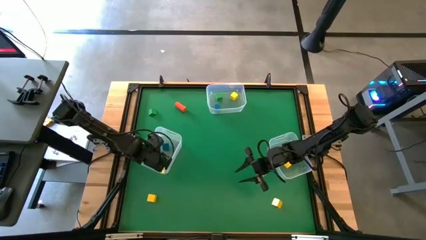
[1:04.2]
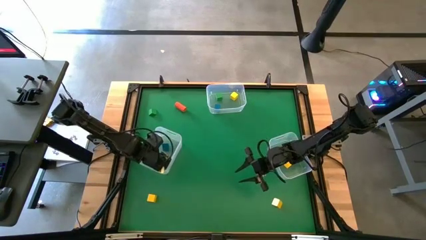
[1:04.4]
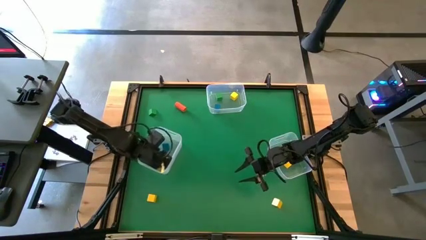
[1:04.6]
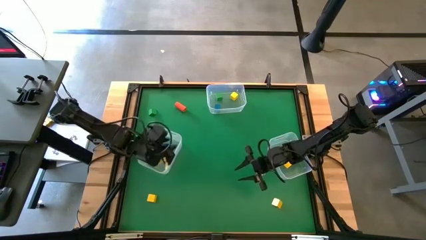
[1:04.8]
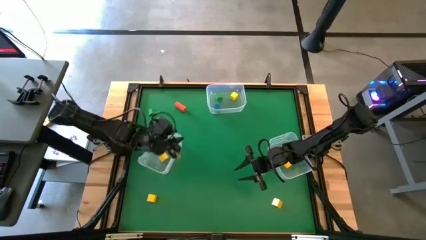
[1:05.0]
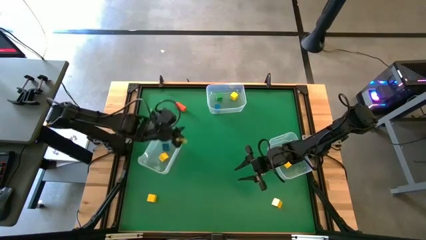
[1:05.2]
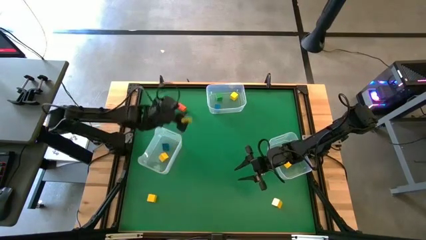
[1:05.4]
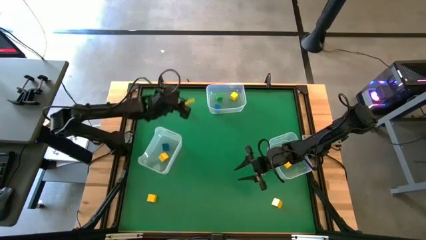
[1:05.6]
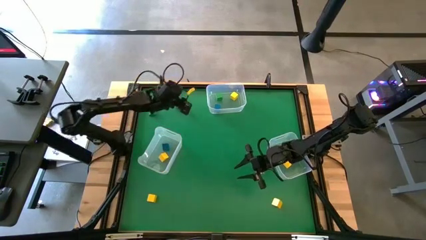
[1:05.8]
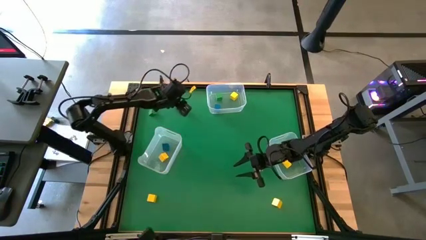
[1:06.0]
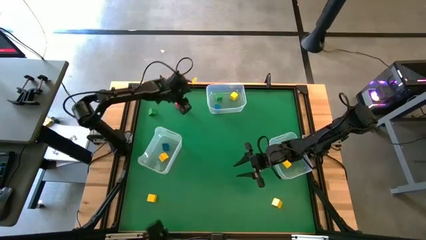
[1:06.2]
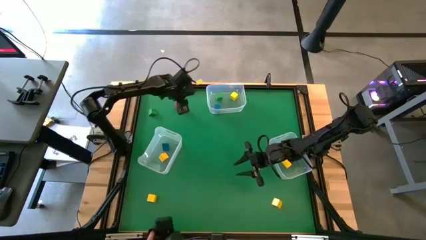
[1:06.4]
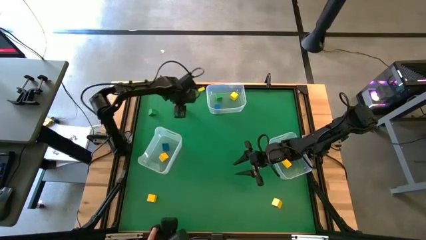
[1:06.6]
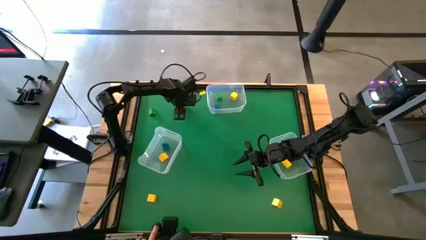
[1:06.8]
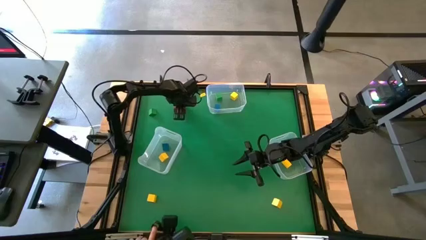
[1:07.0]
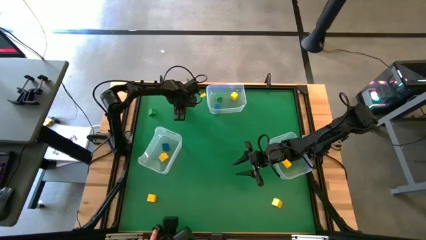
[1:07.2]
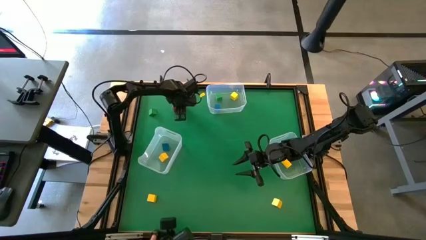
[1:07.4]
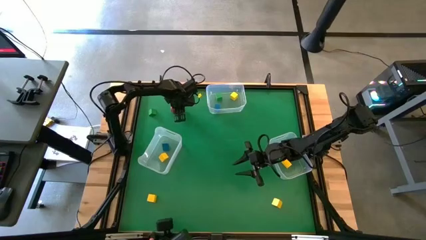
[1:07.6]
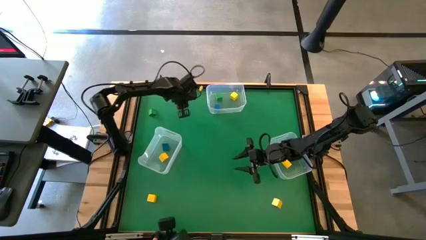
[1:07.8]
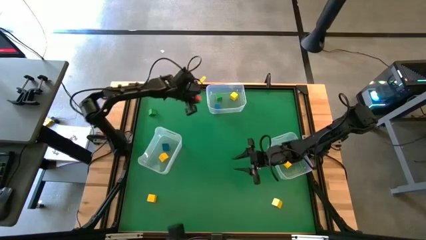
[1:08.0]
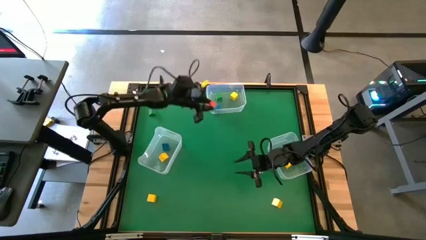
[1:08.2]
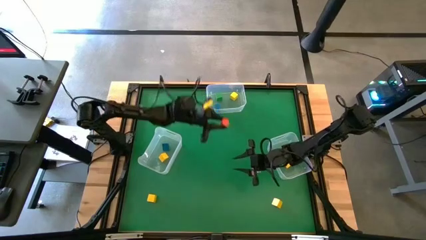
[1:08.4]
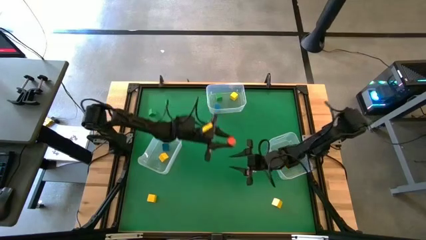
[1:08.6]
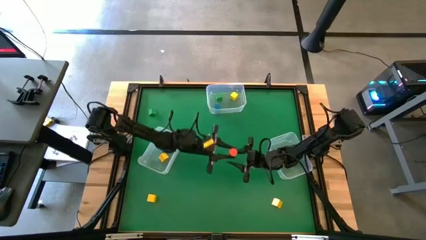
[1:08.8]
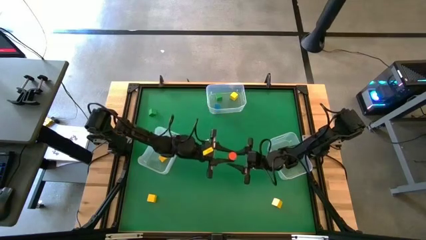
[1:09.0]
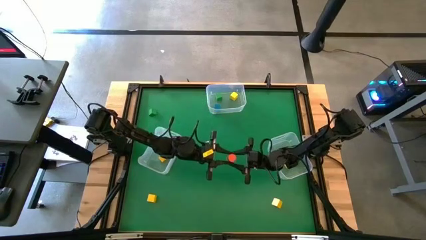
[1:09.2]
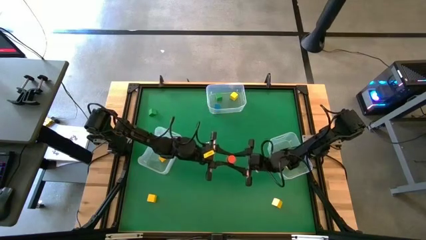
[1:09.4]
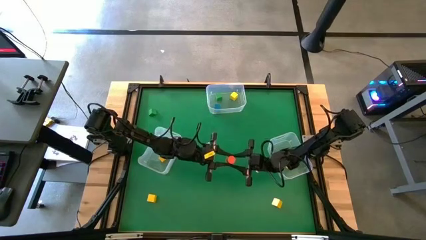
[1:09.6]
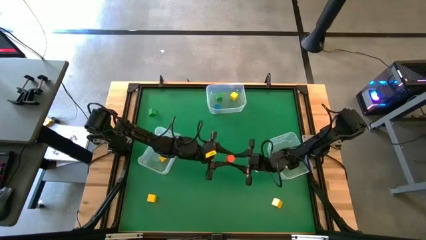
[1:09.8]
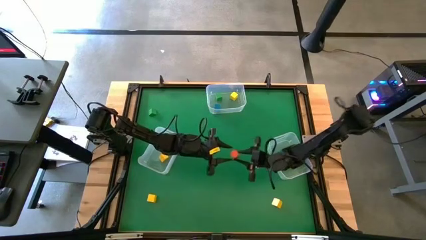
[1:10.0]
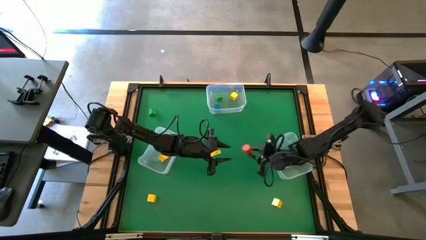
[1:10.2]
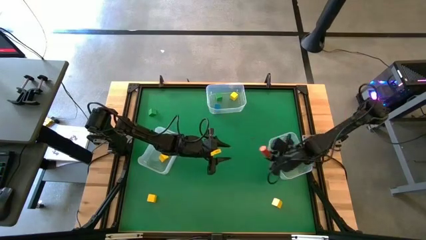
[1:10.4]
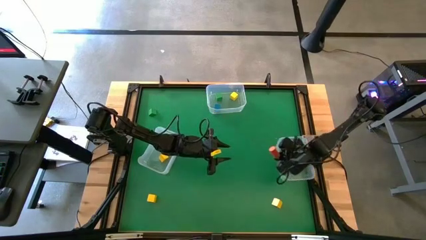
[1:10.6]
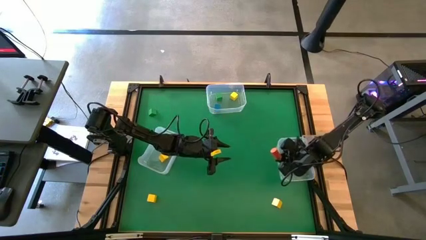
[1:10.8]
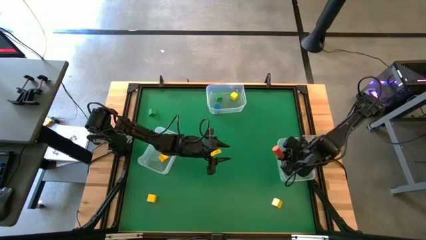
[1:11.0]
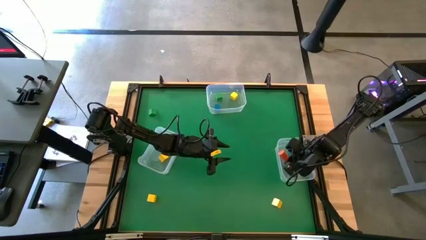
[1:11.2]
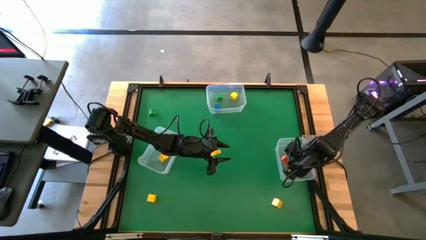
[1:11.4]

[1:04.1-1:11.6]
Task: Sort blocks by size
Put the orange cylindrical block into the bottom right transparent bin

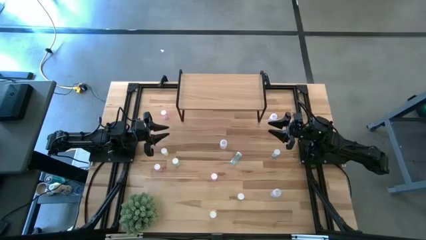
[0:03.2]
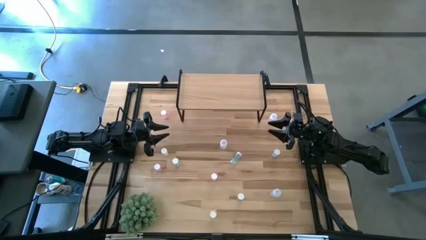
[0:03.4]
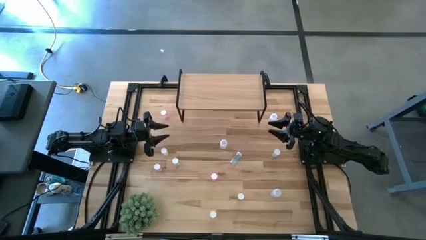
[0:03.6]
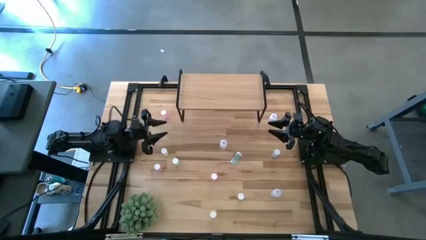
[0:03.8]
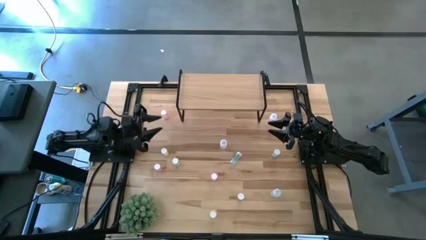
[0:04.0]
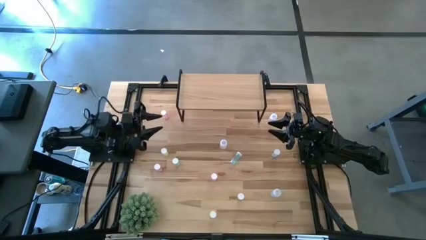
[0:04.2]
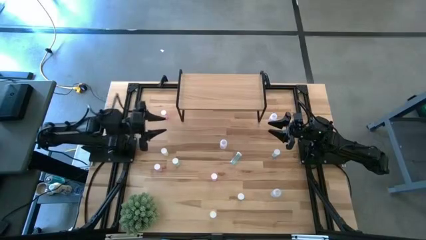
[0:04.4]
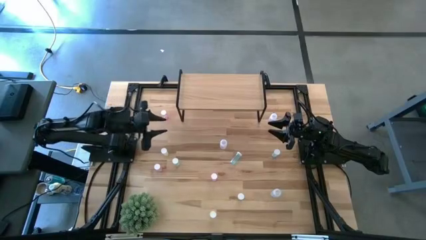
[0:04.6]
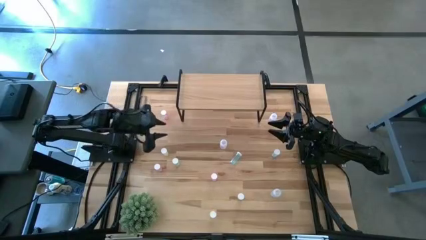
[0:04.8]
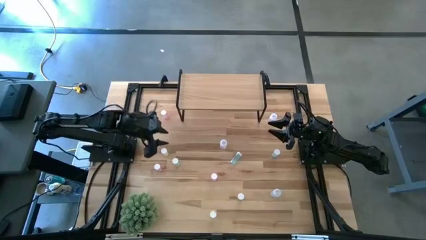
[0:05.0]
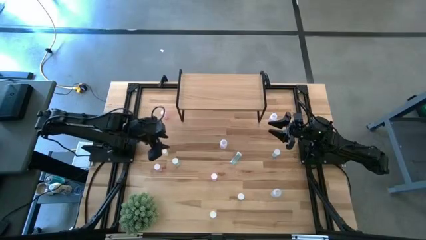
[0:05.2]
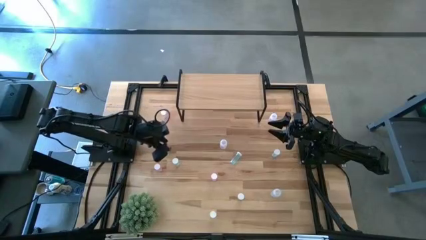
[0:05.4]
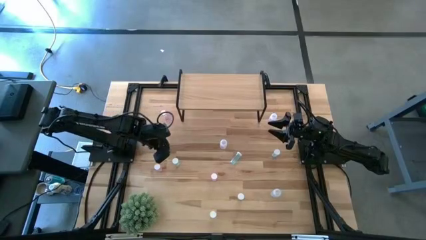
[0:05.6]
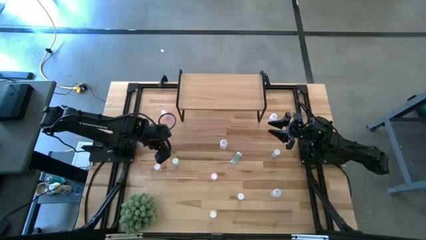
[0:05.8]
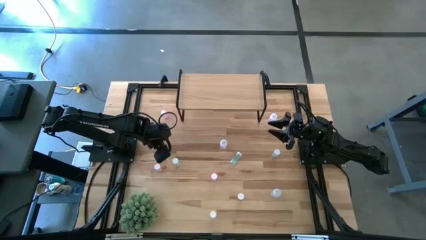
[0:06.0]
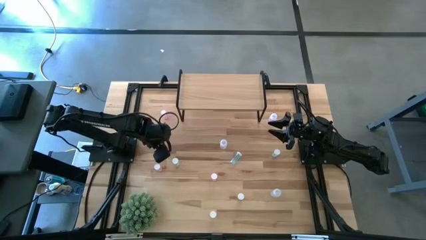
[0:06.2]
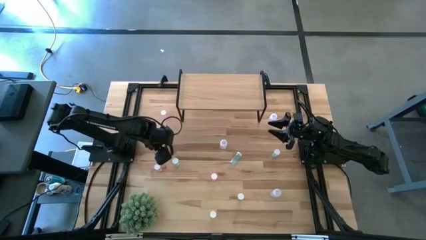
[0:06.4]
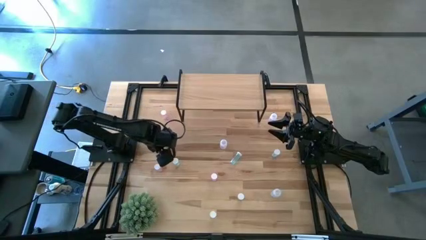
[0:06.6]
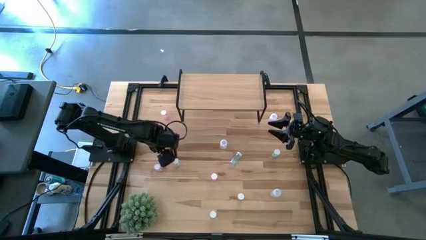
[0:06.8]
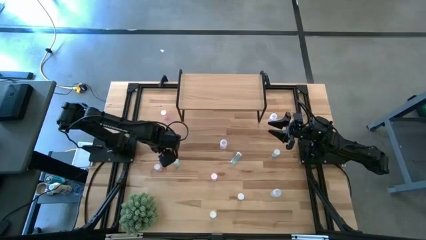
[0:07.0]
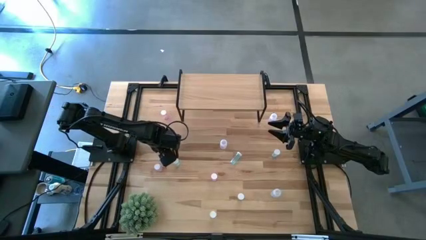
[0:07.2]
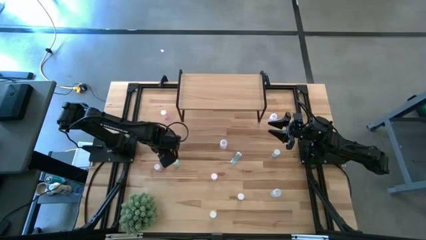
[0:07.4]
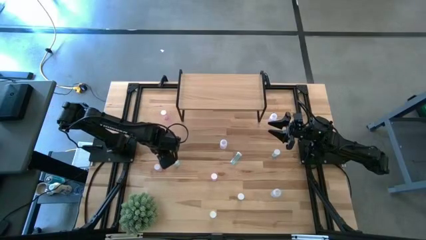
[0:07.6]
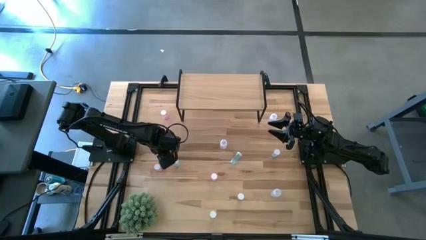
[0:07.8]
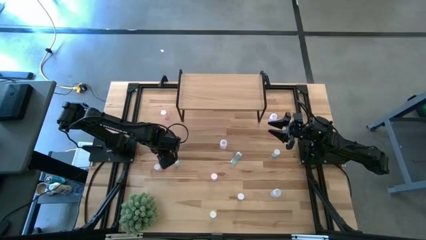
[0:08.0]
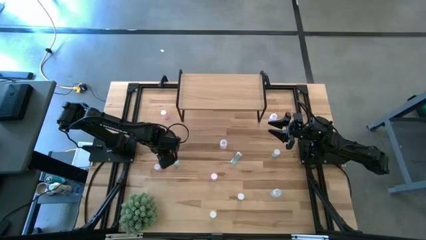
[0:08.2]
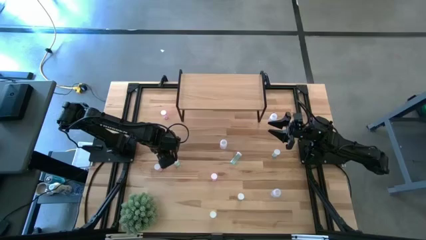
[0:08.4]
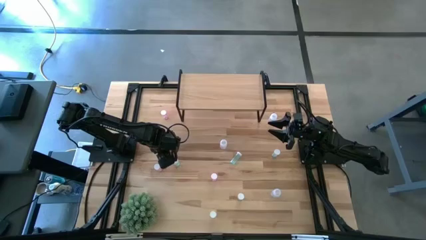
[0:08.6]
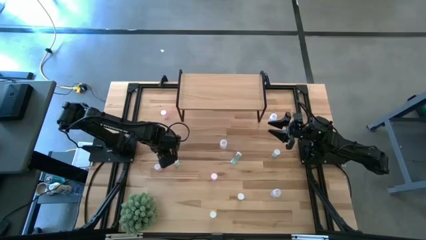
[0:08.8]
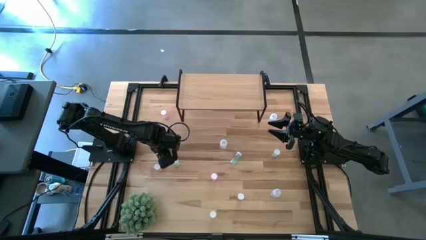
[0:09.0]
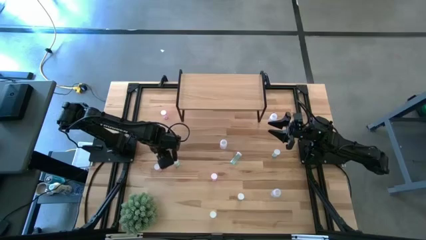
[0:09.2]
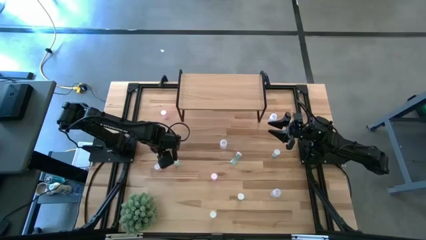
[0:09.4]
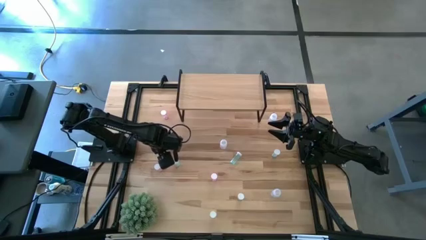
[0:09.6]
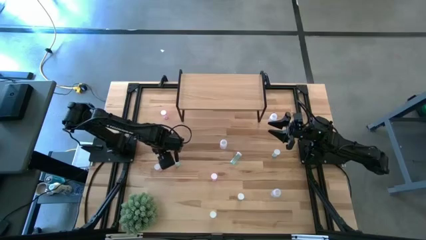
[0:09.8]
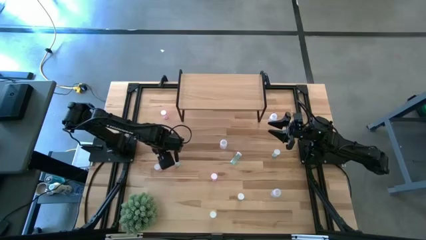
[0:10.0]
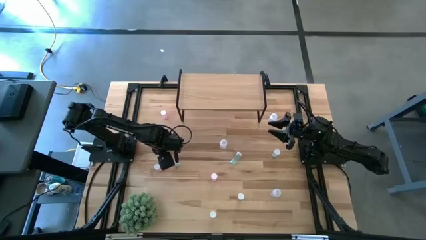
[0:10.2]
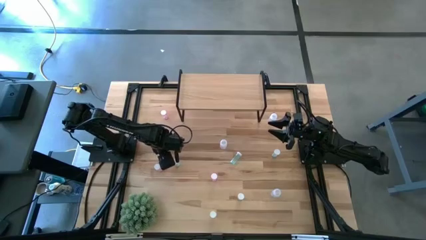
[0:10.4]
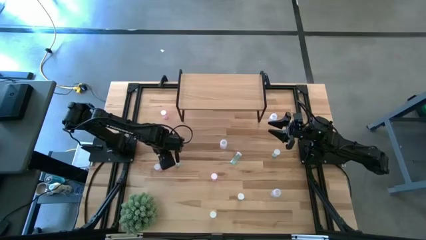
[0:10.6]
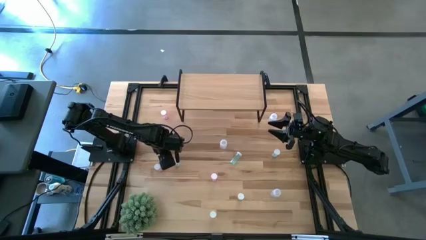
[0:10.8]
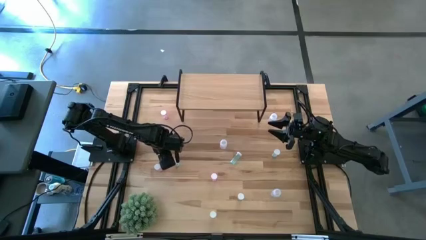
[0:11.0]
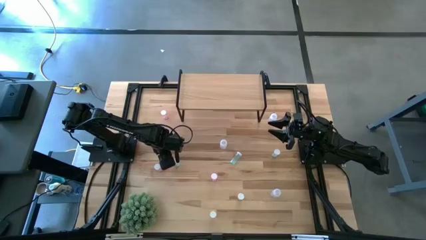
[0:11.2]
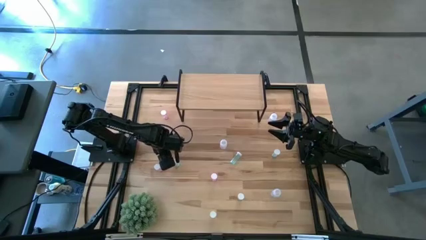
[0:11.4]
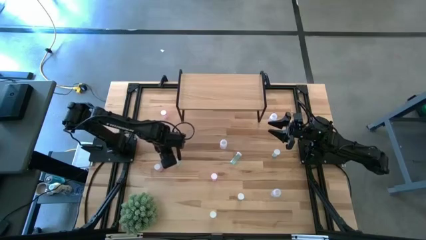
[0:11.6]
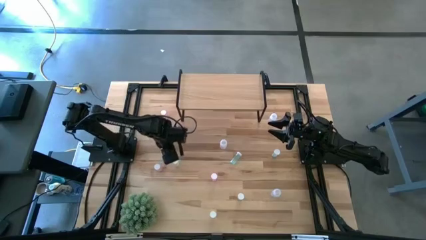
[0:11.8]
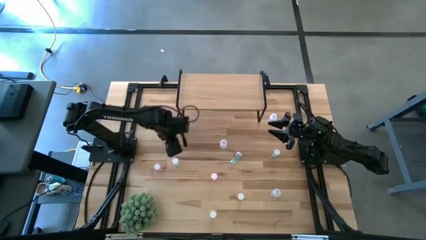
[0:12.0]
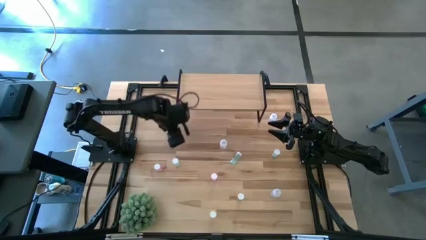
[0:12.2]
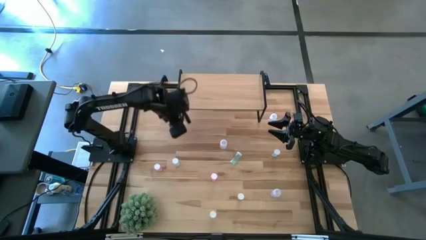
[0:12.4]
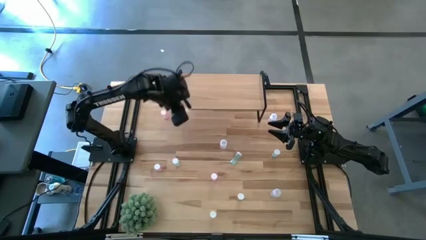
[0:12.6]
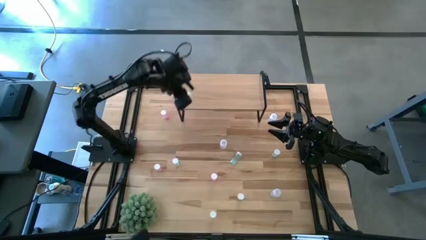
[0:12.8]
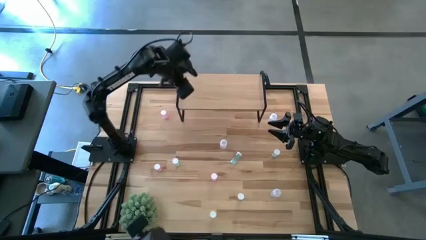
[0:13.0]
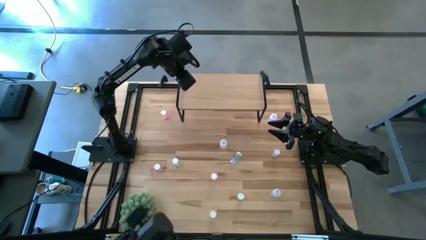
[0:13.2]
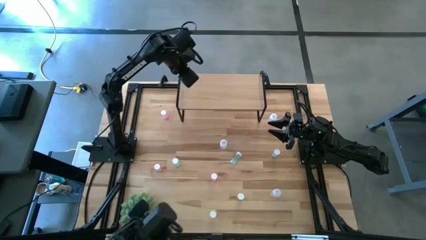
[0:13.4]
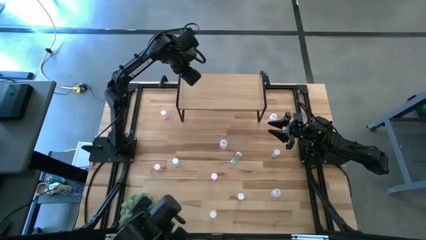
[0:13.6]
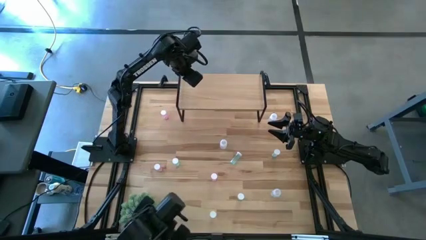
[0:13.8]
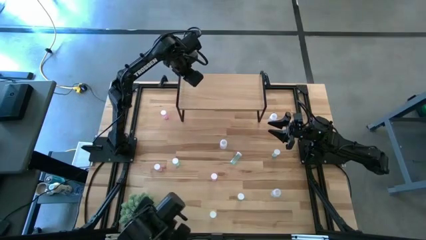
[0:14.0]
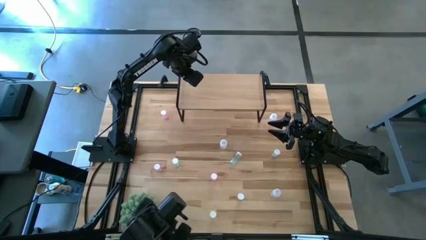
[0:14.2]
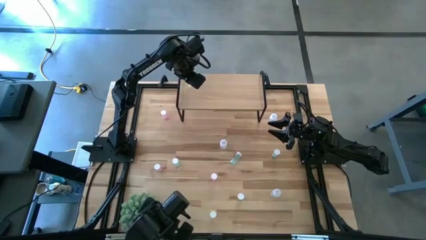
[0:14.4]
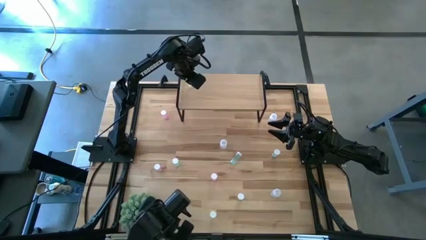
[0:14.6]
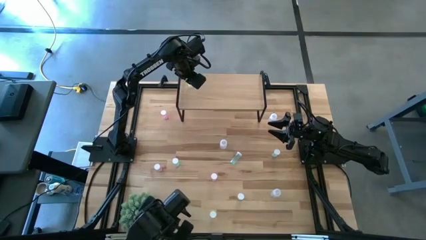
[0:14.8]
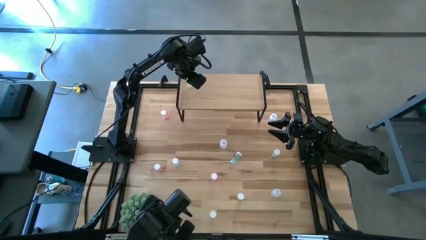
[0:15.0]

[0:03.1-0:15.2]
Task: Pick and place medicine bottles onto shelf by color
Put the left yellow pill bottle on the shelf
